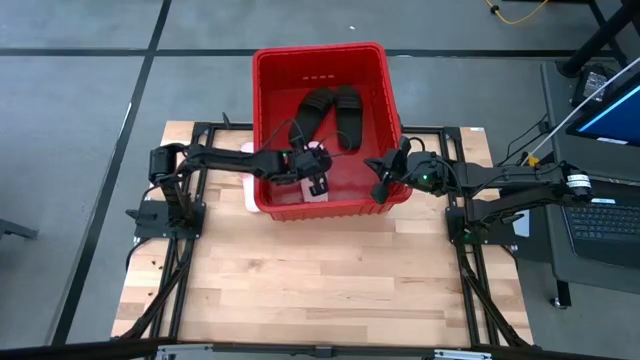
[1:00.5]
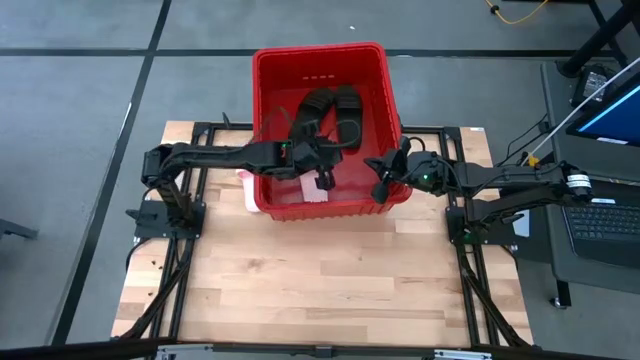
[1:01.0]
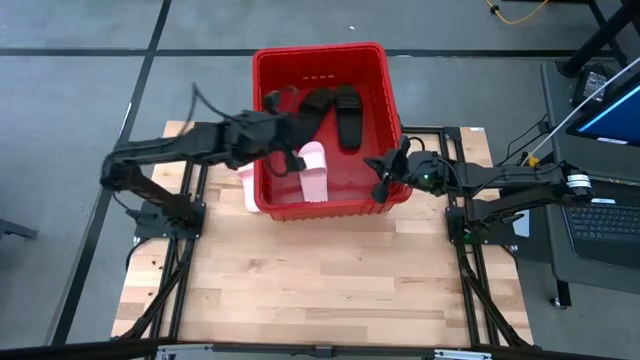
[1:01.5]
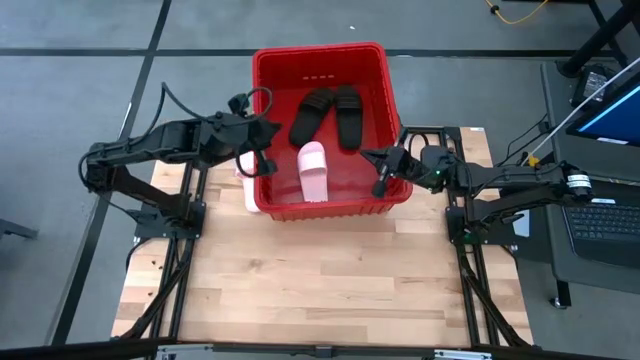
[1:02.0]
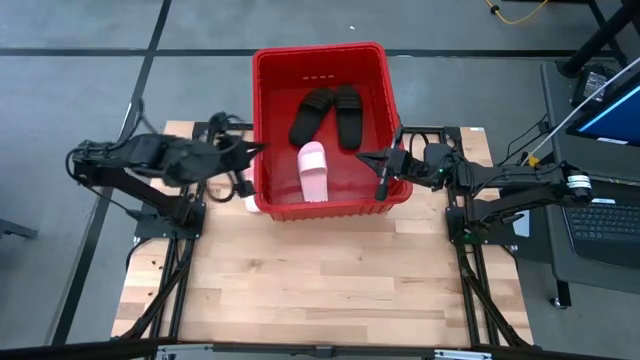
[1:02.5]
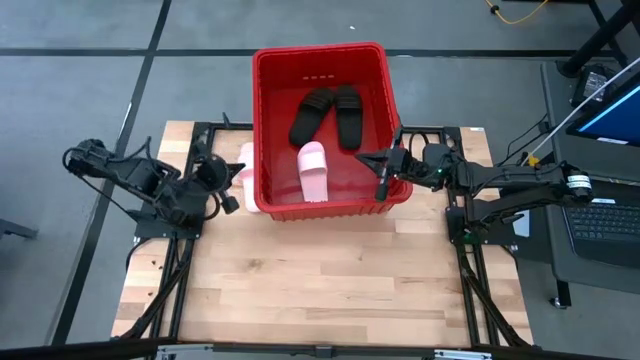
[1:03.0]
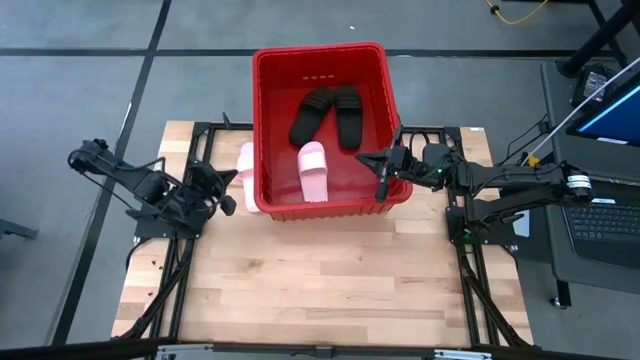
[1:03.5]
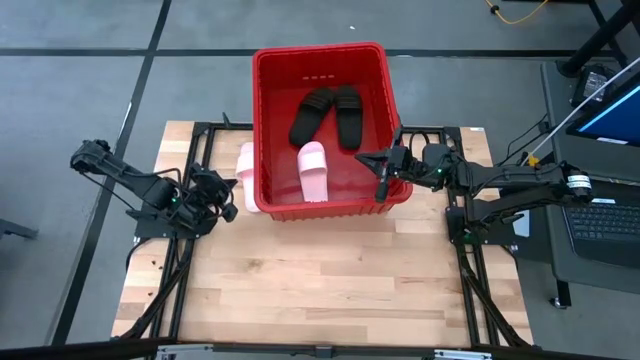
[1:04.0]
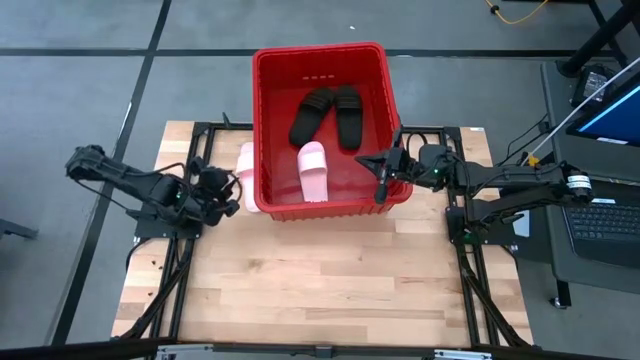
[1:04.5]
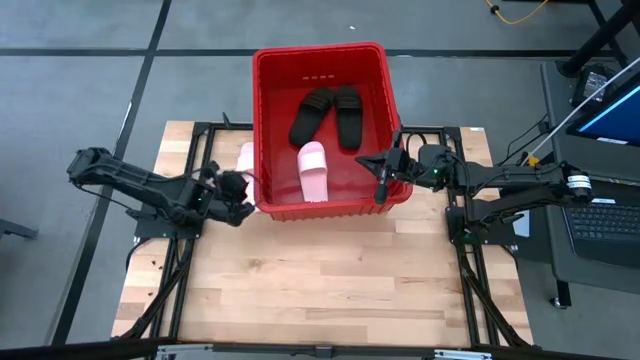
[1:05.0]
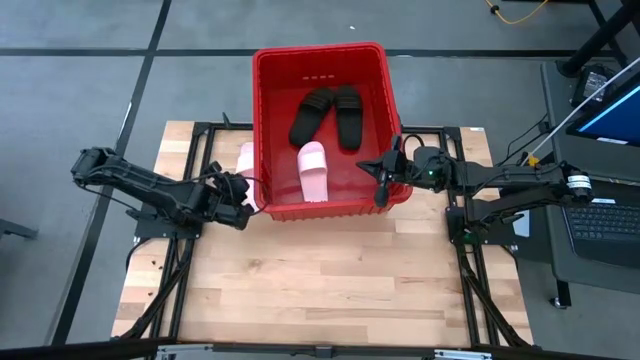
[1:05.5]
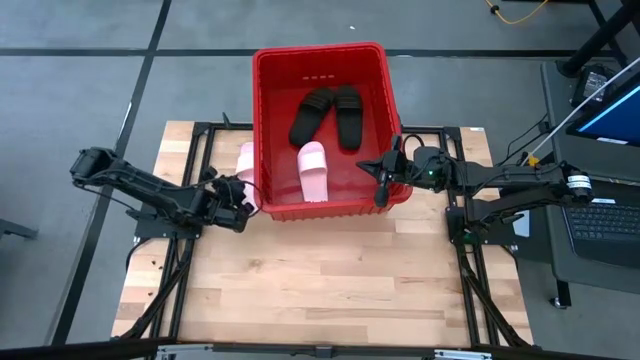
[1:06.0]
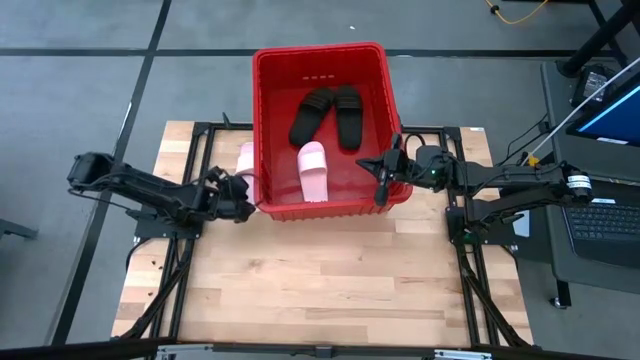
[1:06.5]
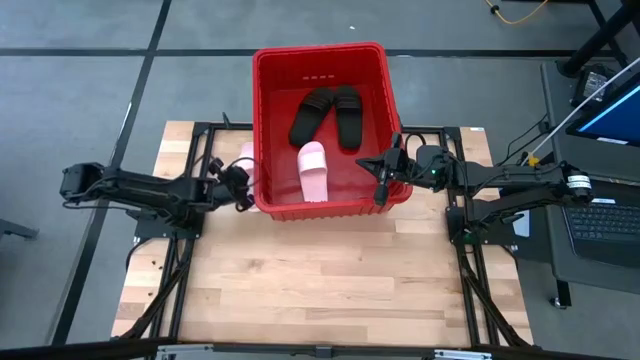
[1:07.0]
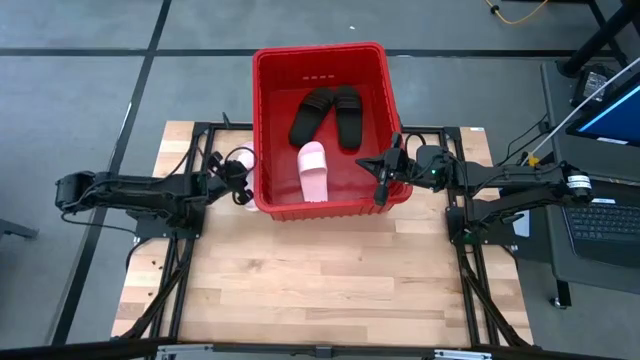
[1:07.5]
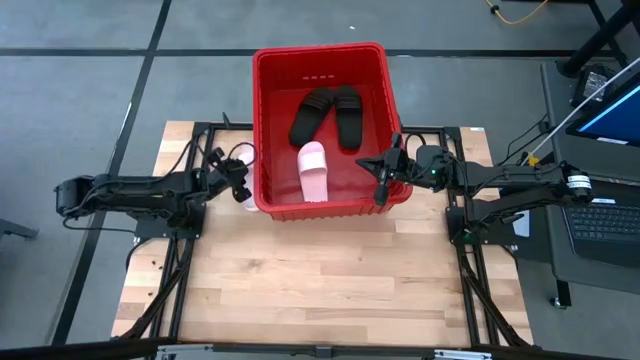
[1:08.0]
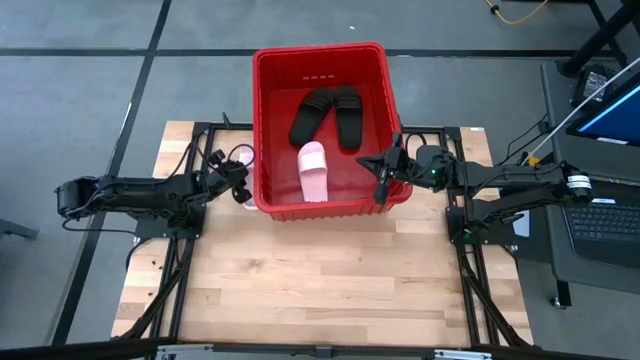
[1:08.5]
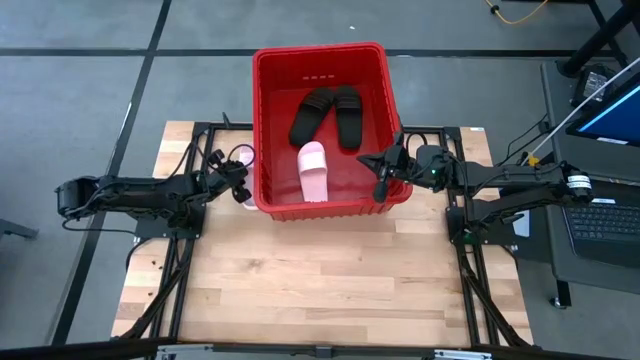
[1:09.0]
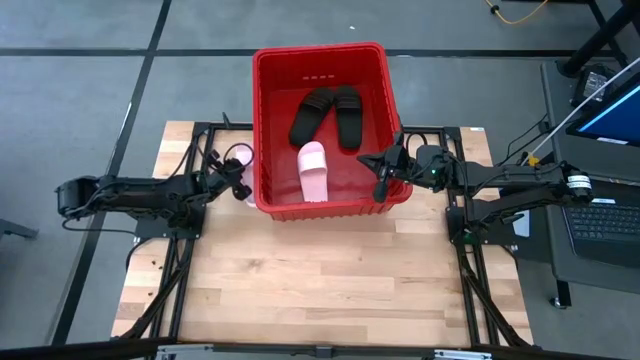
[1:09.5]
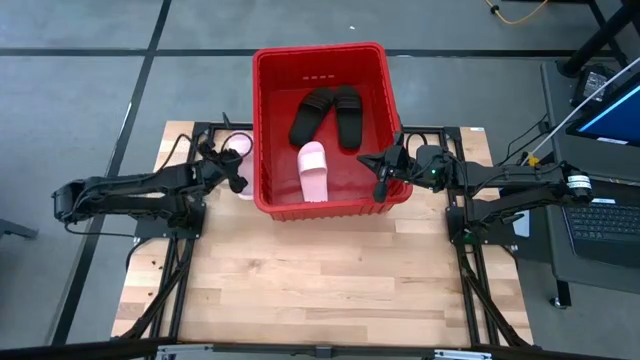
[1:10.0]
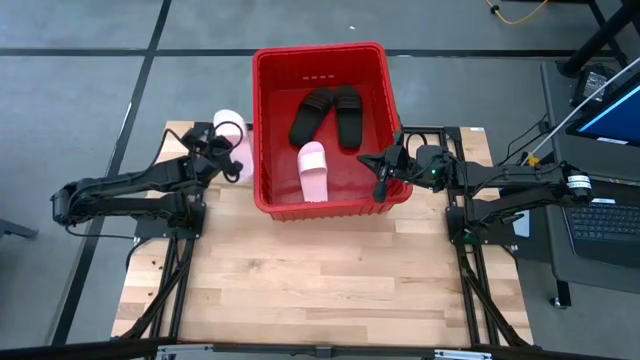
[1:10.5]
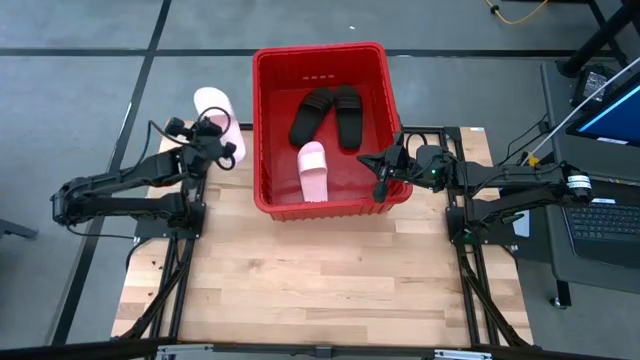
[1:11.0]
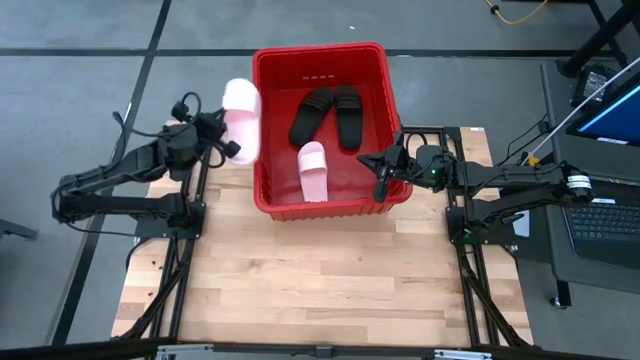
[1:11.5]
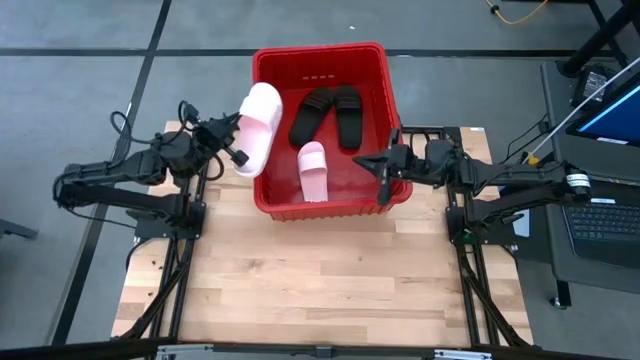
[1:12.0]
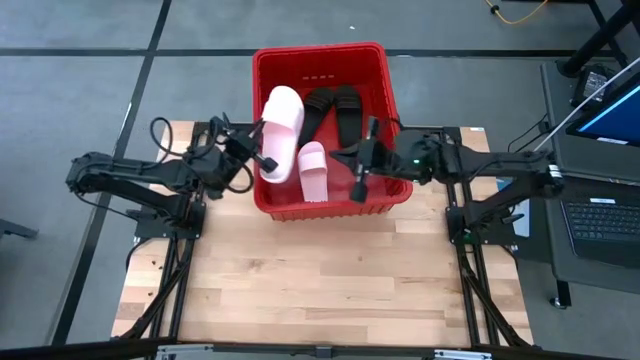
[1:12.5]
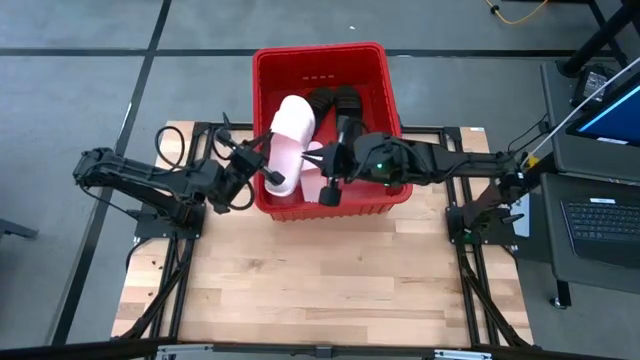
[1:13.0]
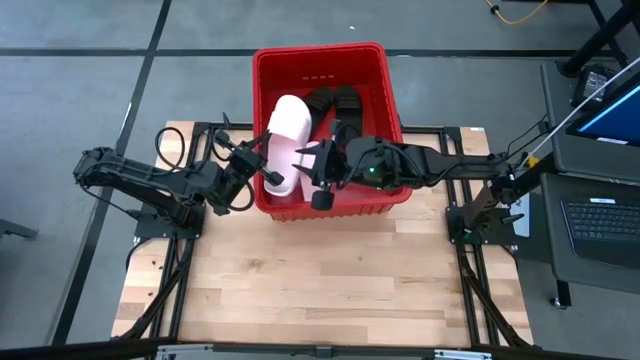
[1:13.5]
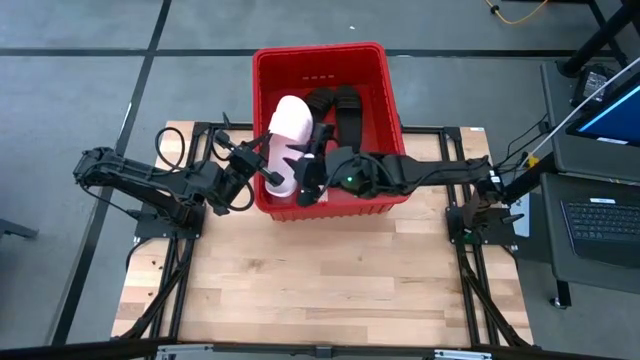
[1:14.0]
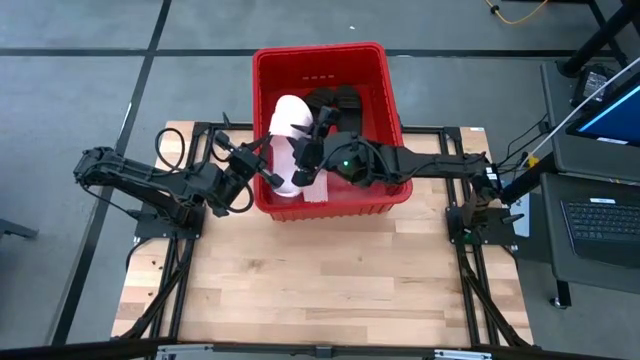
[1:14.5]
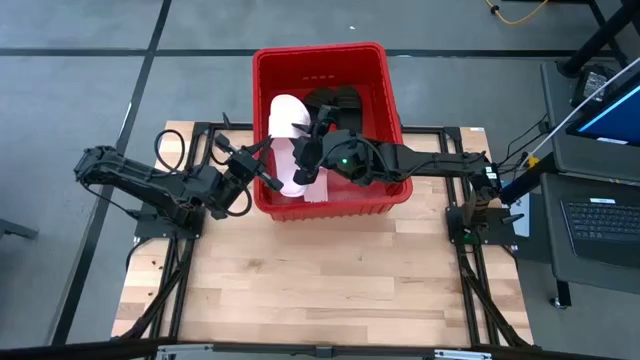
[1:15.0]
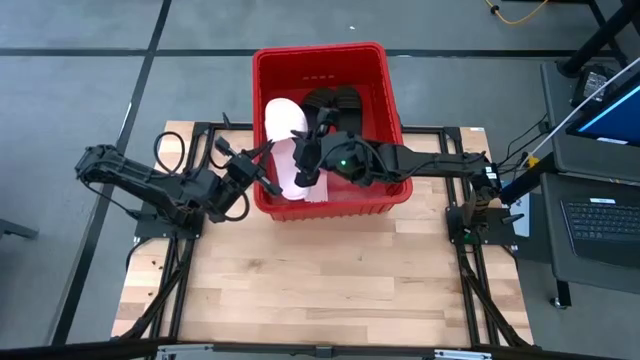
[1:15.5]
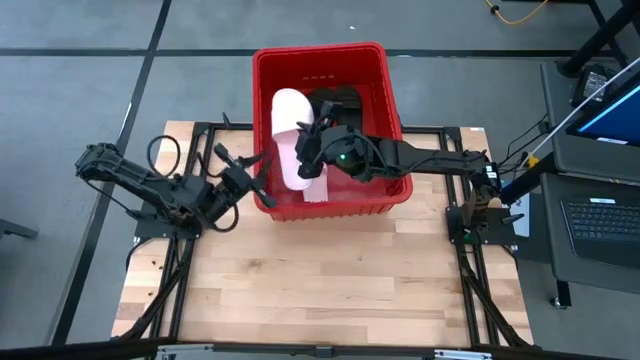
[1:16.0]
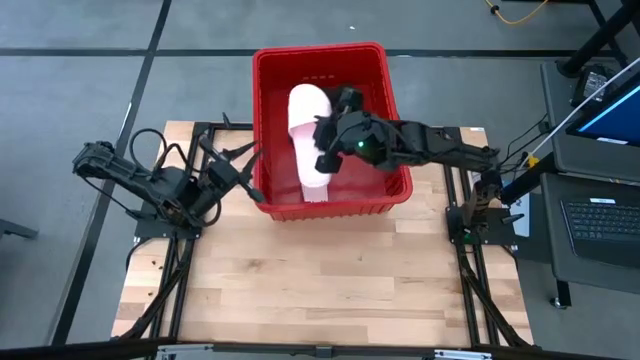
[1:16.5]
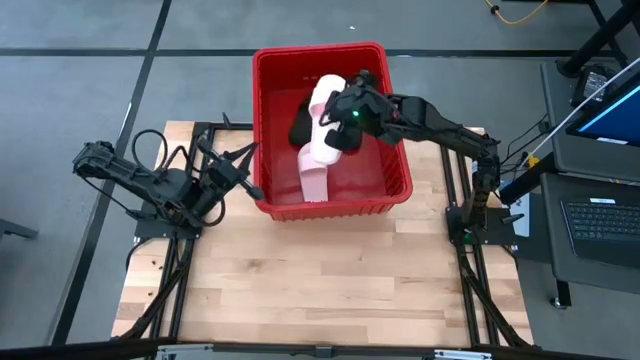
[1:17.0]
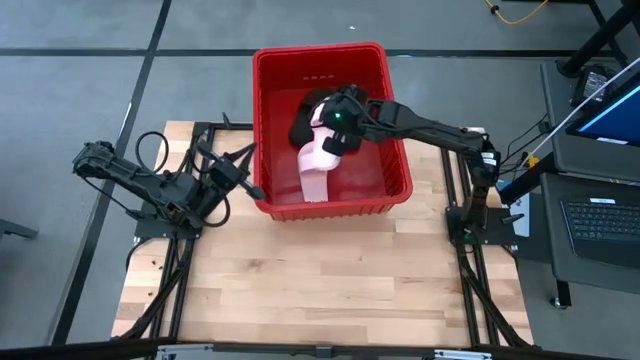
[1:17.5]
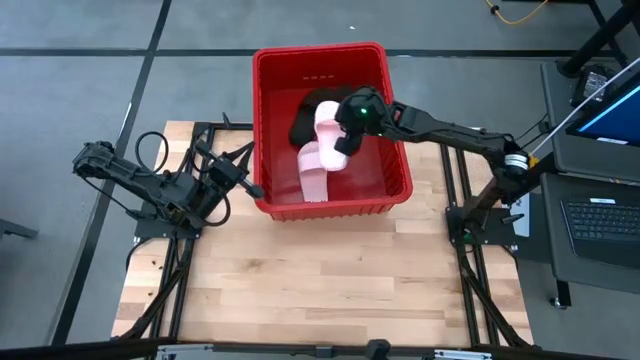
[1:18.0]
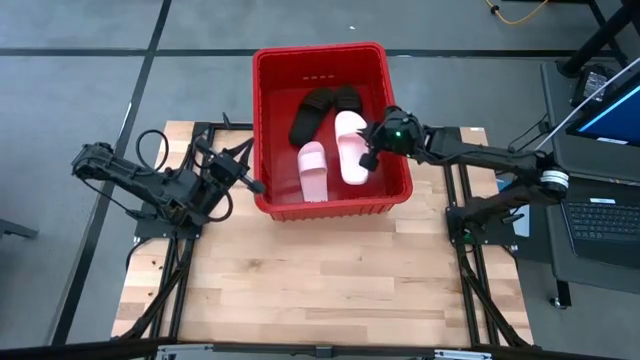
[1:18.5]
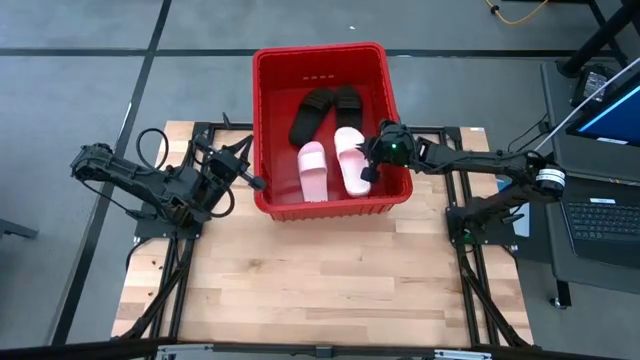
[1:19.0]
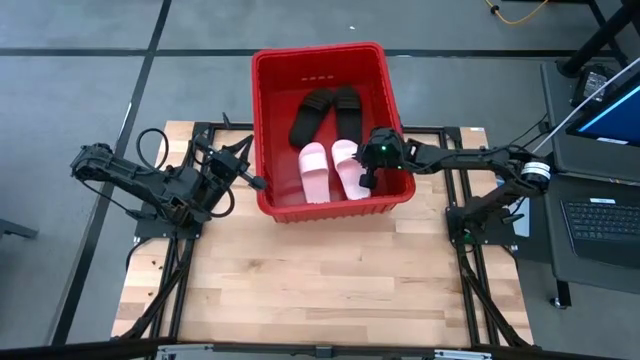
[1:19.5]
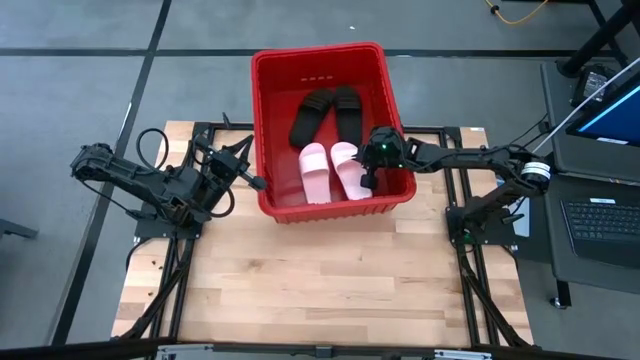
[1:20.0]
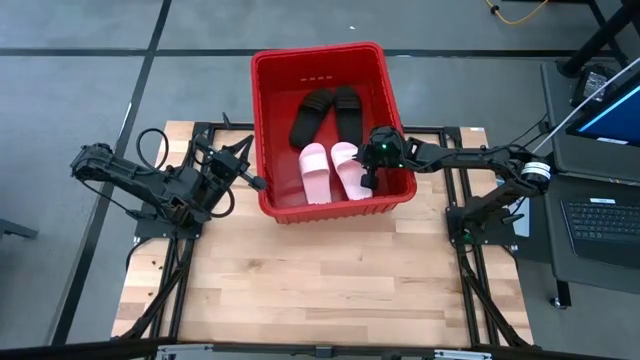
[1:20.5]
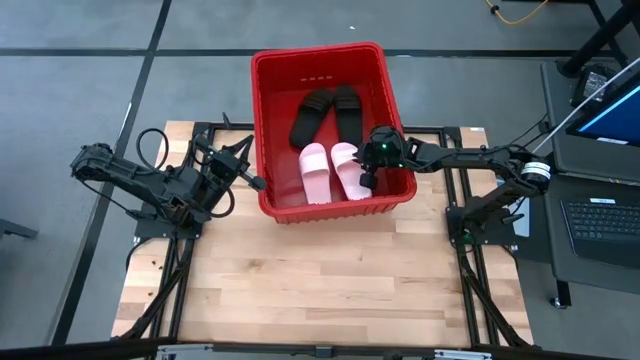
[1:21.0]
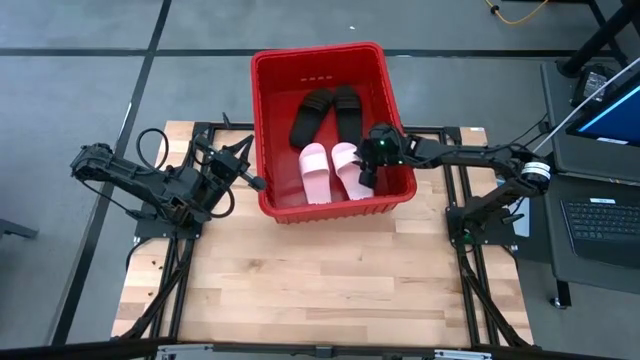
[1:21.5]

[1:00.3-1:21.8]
Task: Pick and place slides into bin
Put the pink slide in the red bin

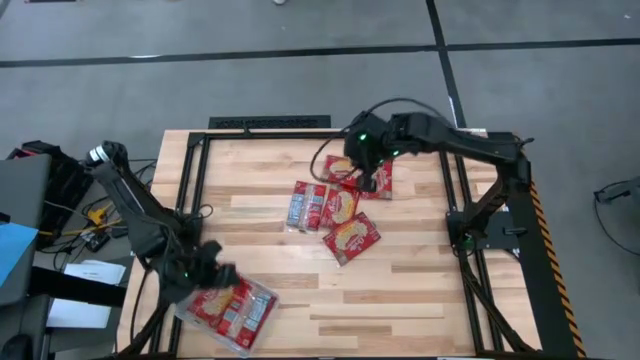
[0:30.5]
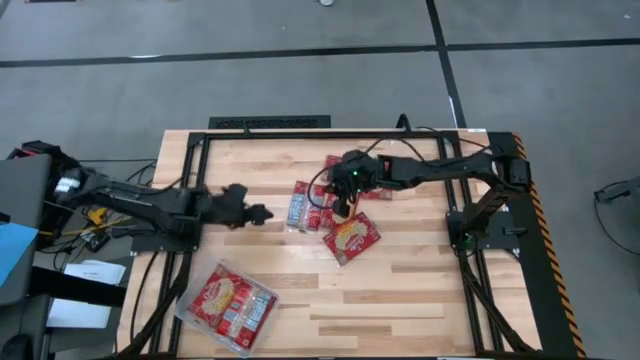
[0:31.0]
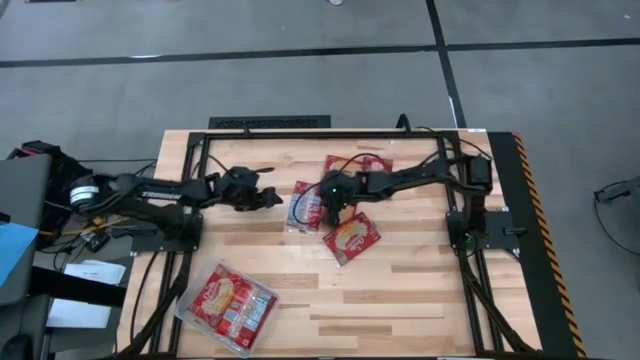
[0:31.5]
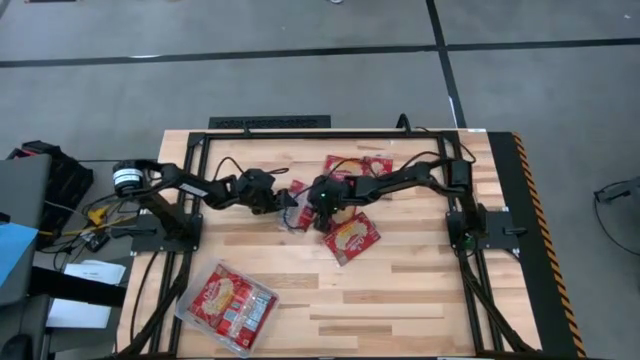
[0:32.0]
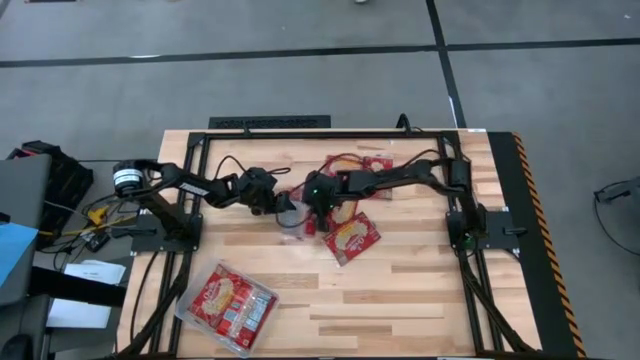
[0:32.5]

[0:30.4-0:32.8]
Task: Sort popcorn bags into baskets
Put the red popcorn bag into the transparent bin
